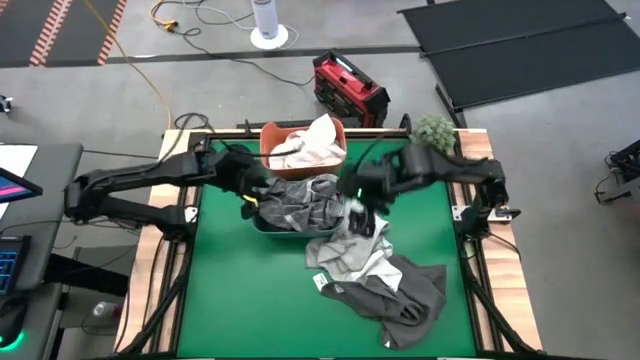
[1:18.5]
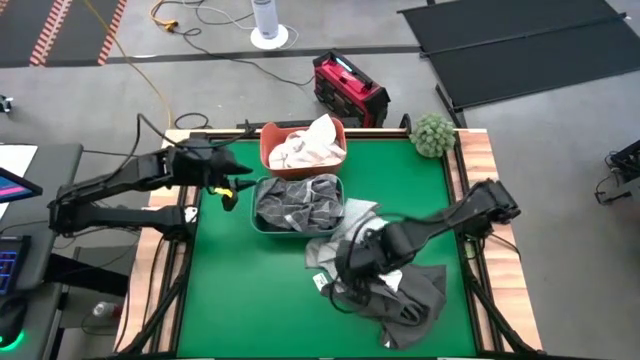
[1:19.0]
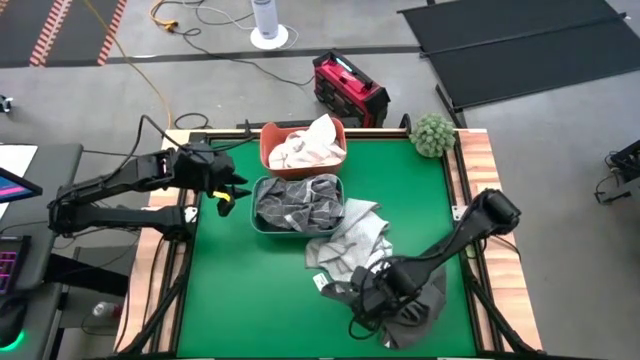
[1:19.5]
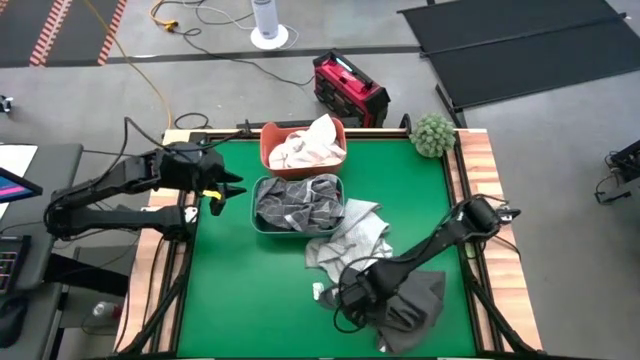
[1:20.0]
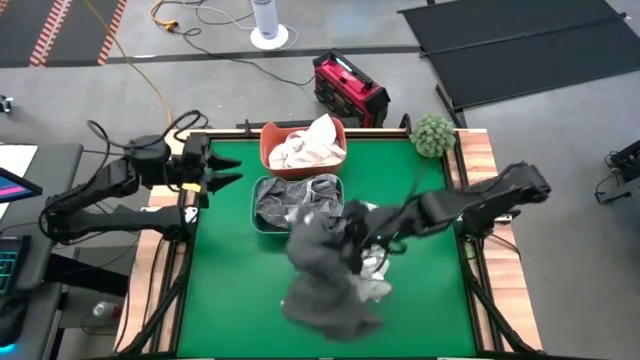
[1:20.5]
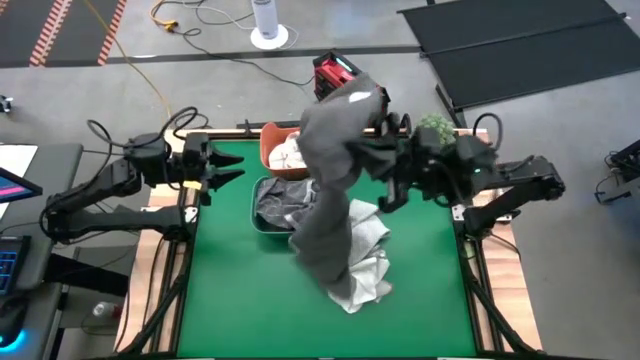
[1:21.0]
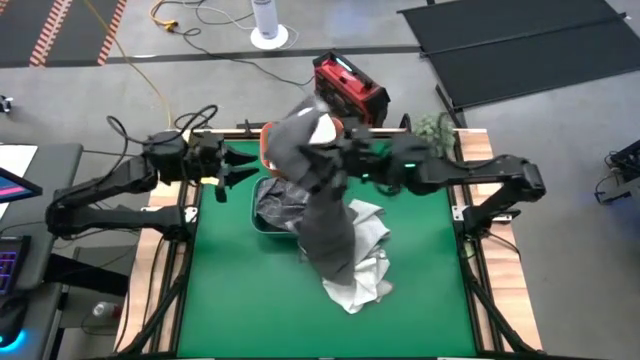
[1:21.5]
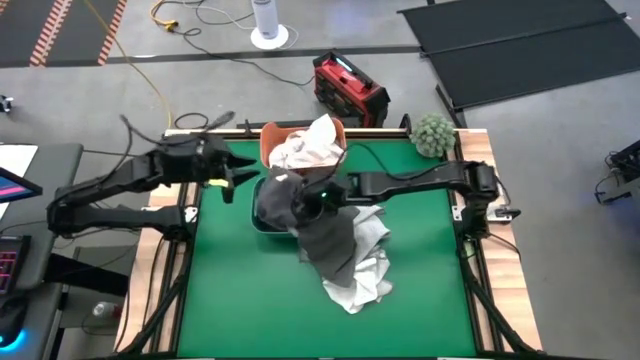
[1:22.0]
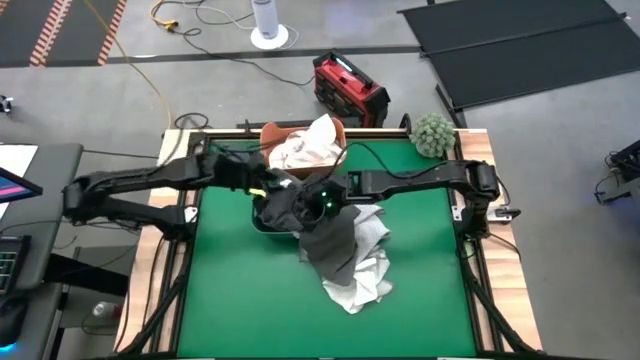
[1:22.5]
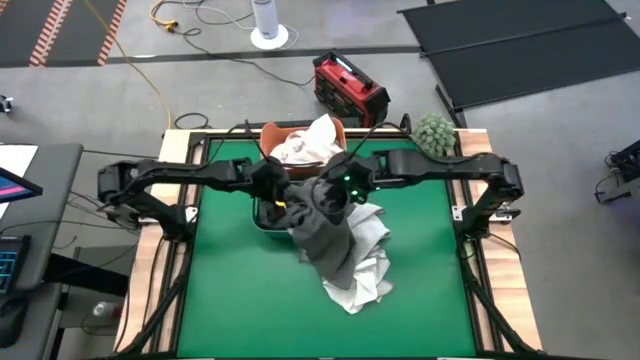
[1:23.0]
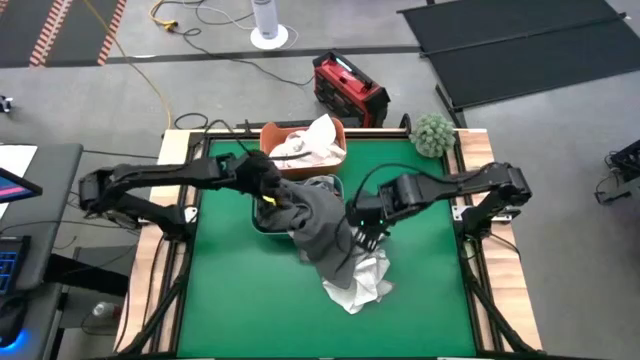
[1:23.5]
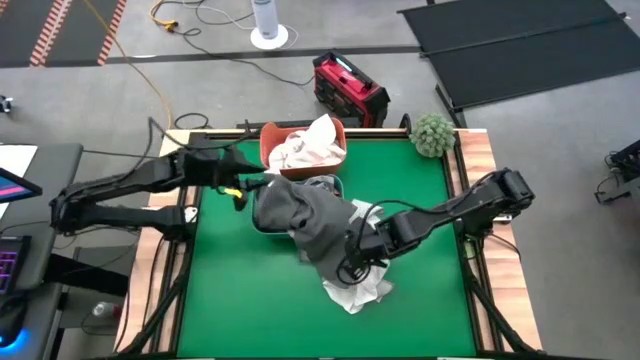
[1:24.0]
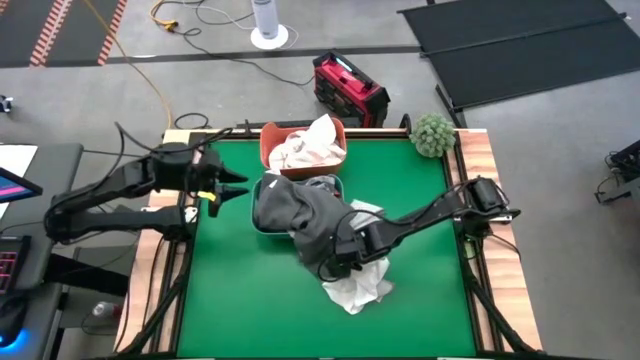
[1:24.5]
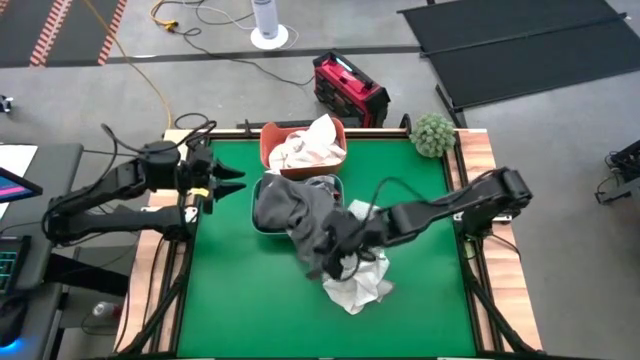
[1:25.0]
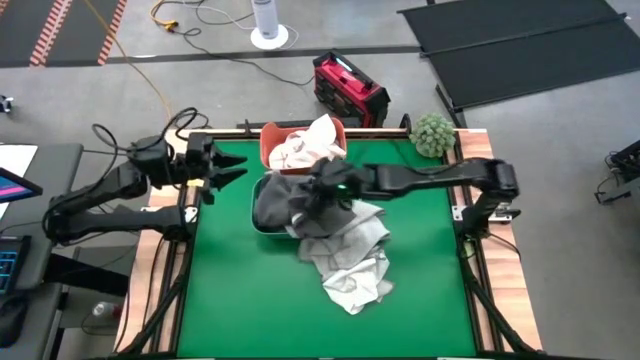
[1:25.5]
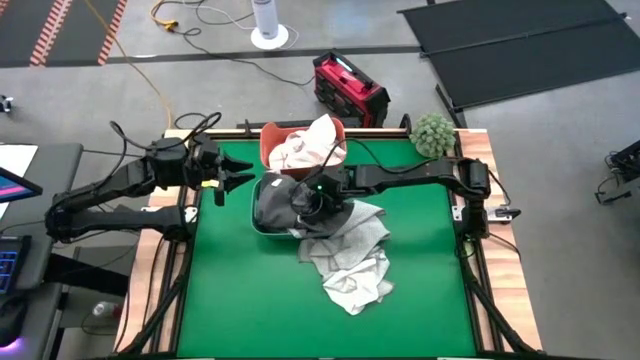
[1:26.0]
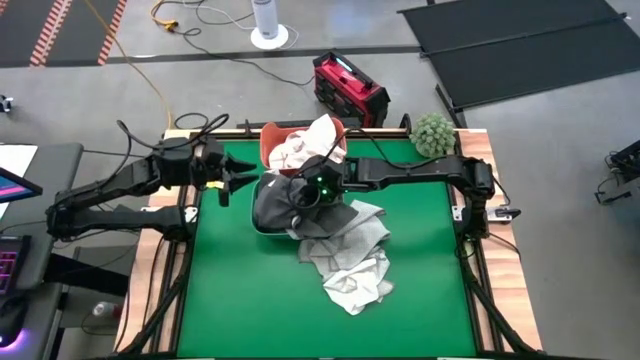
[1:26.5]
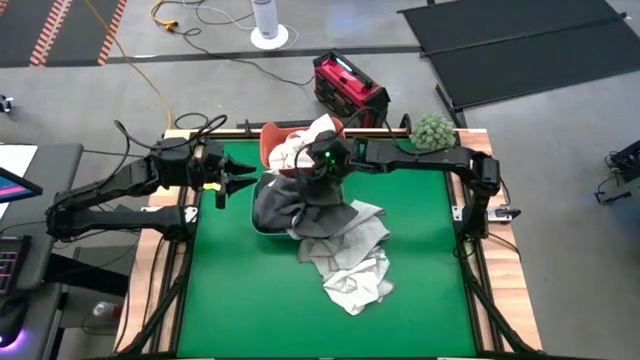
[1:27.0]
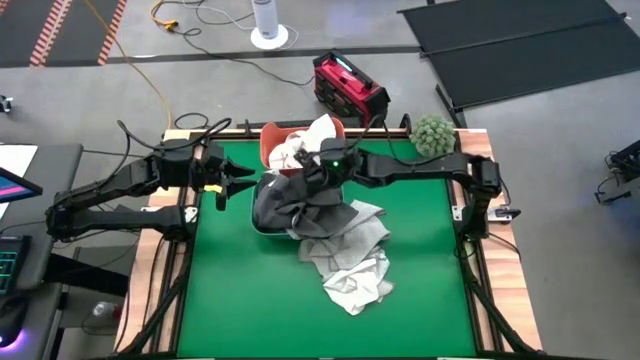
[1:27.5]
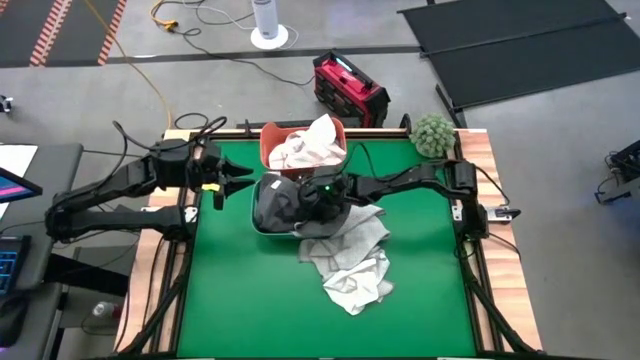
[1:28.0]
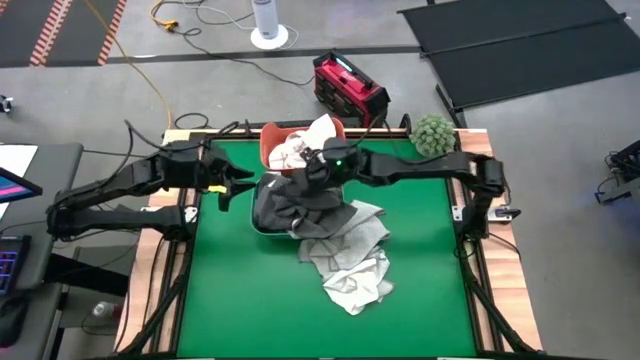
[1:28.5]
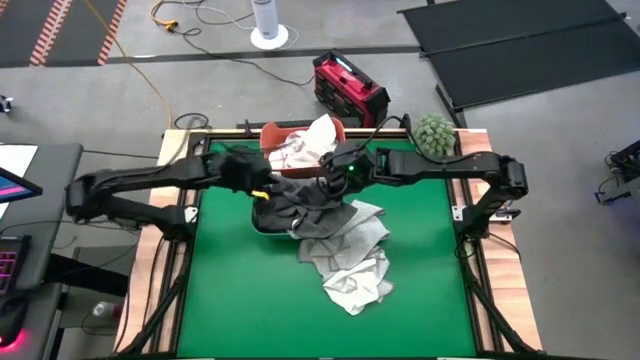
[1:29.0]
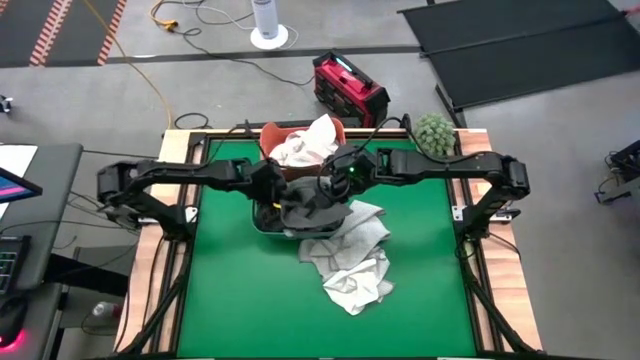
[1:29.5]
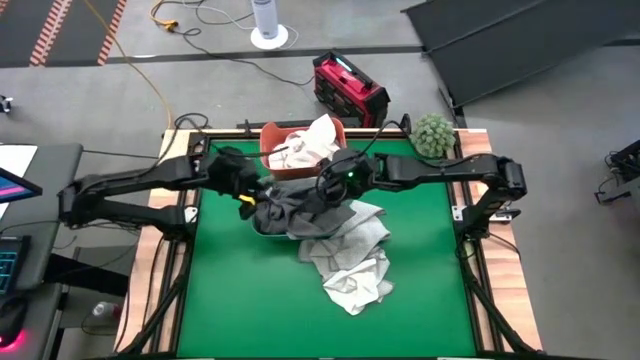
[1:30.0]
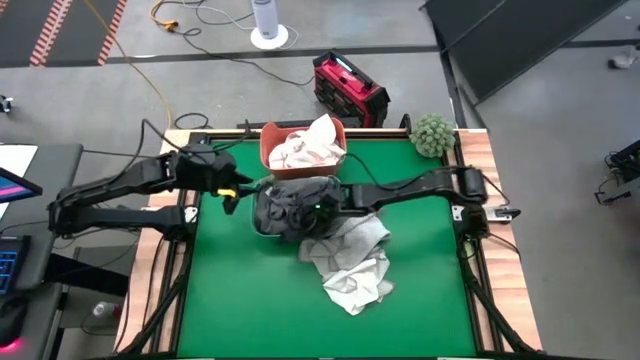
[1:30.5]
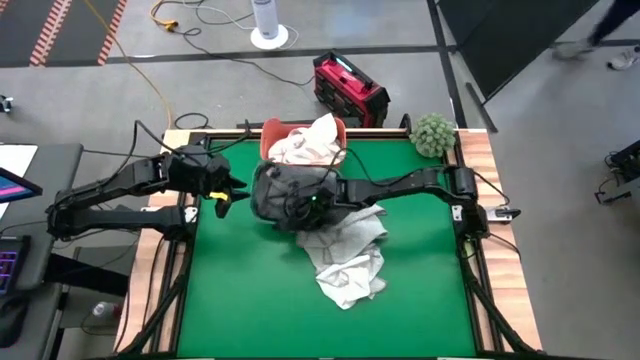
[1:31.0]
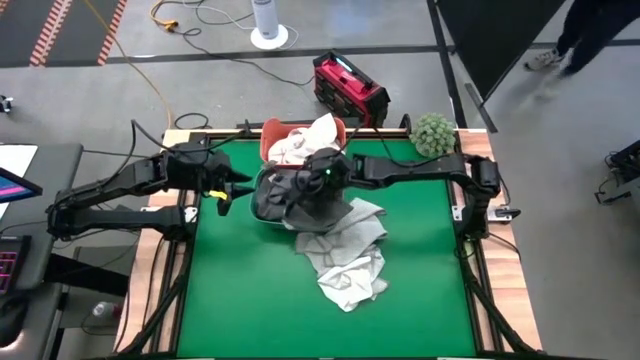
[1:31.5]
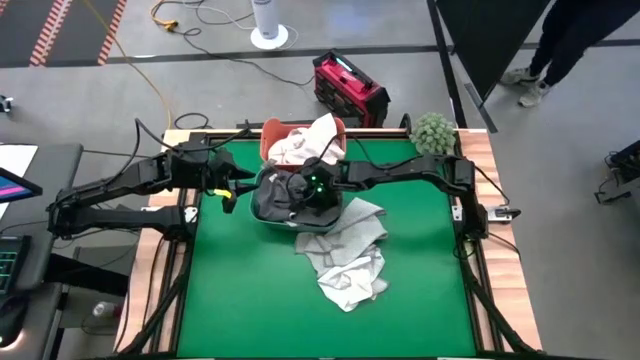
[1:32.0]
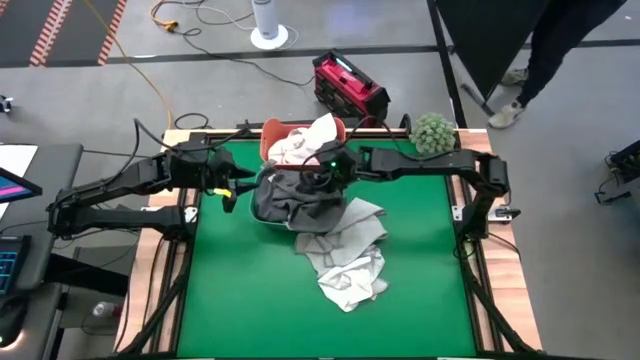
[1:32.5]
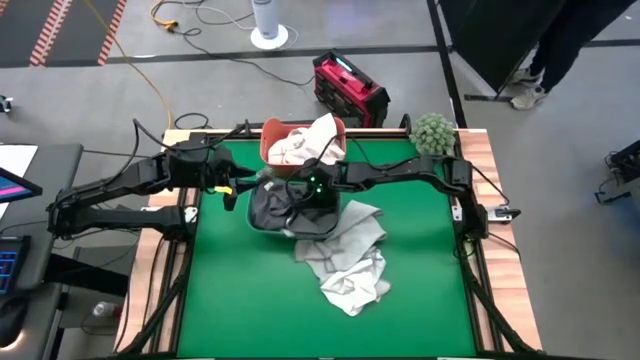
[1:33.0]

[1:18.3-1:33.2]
Task: Sort towels by color in basket
Put the gray towel into the green bin

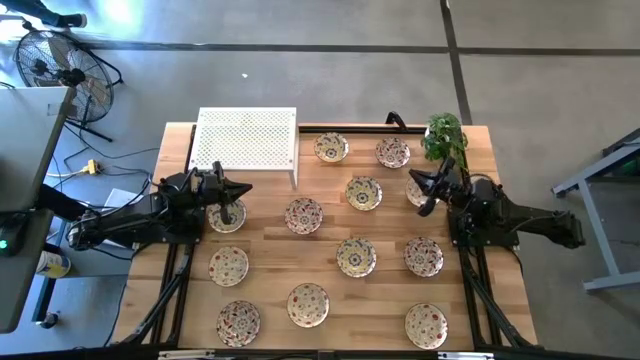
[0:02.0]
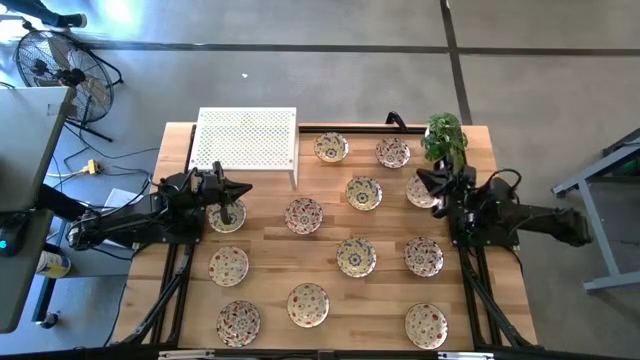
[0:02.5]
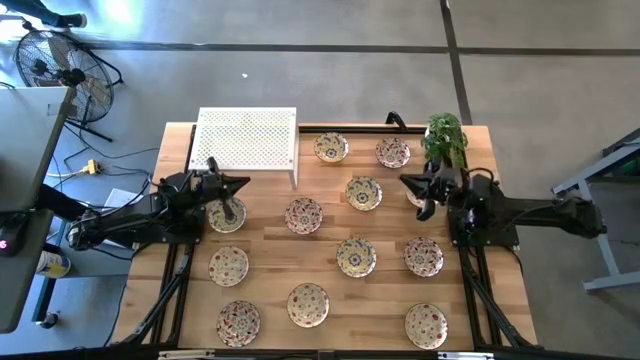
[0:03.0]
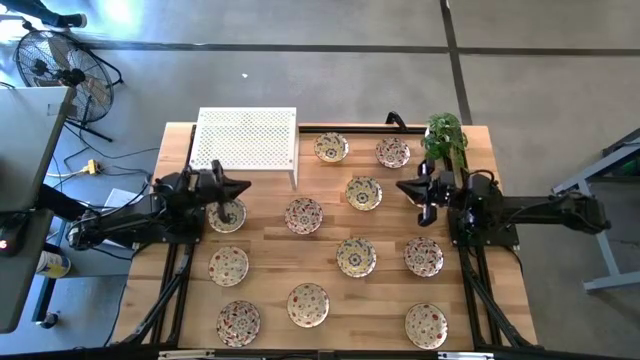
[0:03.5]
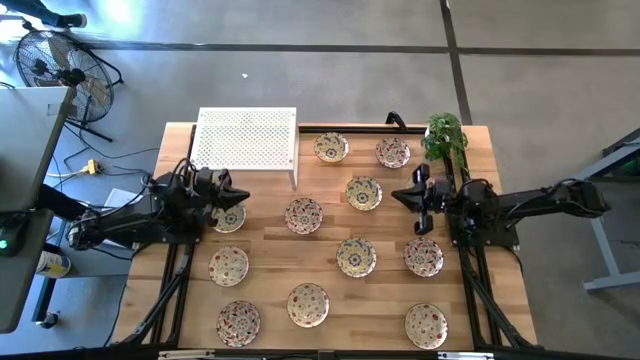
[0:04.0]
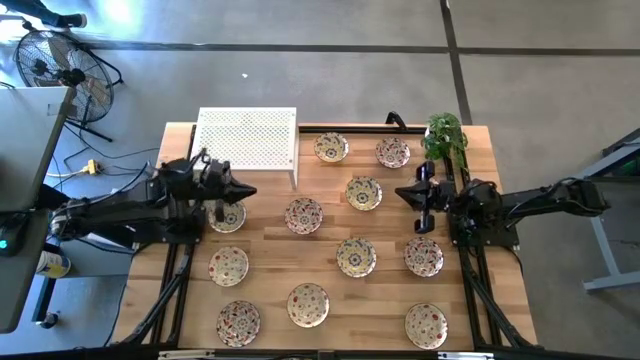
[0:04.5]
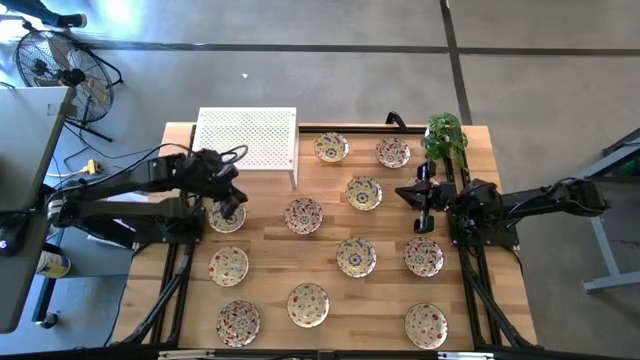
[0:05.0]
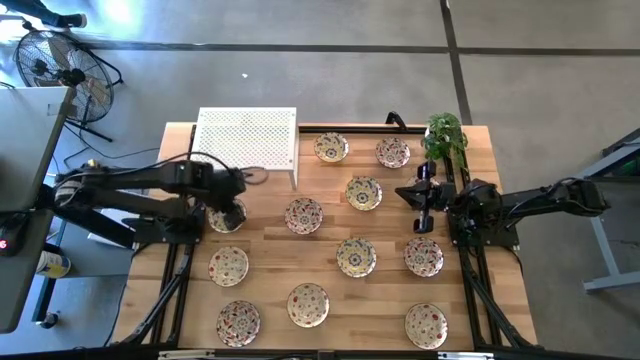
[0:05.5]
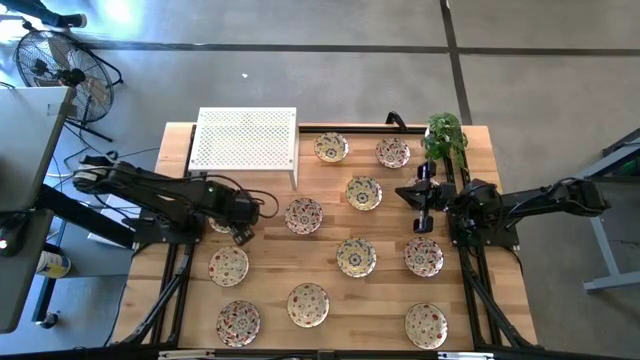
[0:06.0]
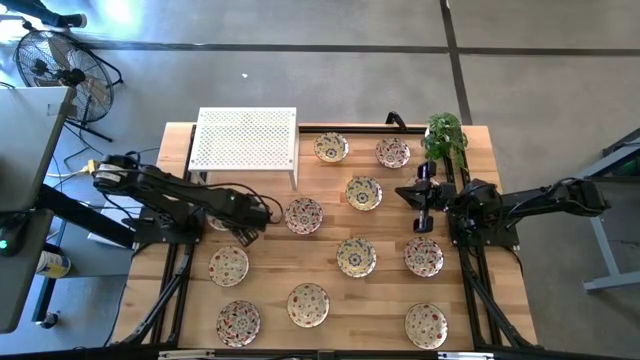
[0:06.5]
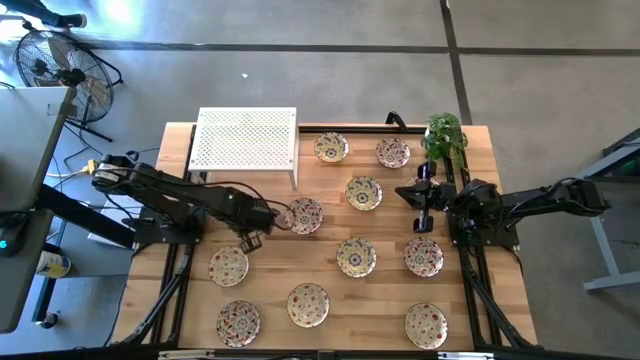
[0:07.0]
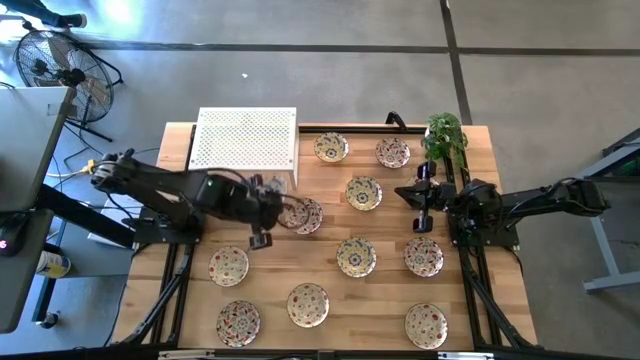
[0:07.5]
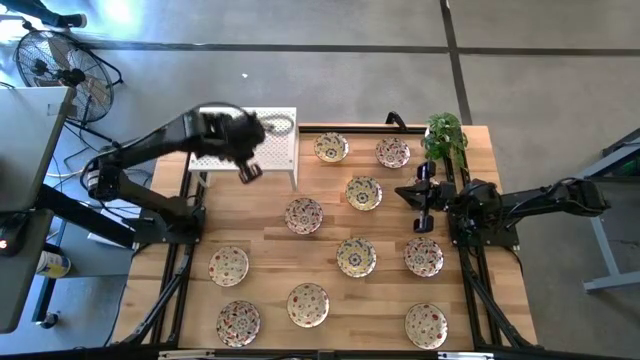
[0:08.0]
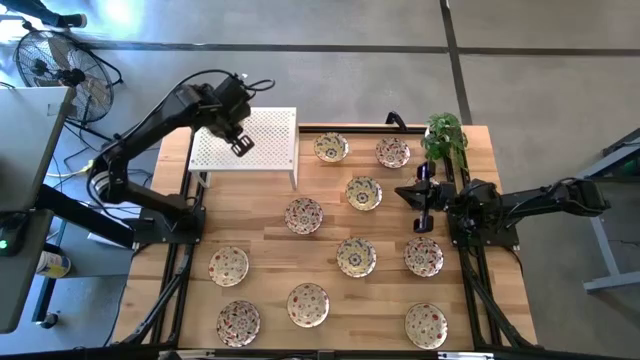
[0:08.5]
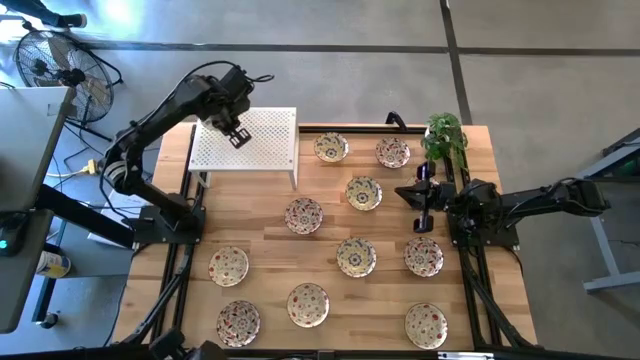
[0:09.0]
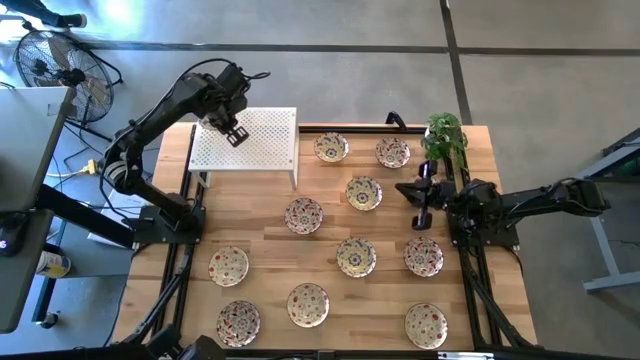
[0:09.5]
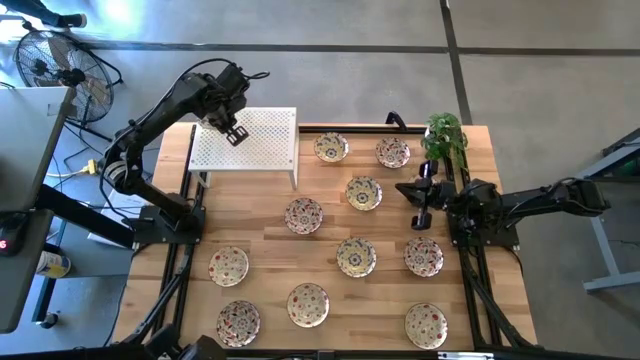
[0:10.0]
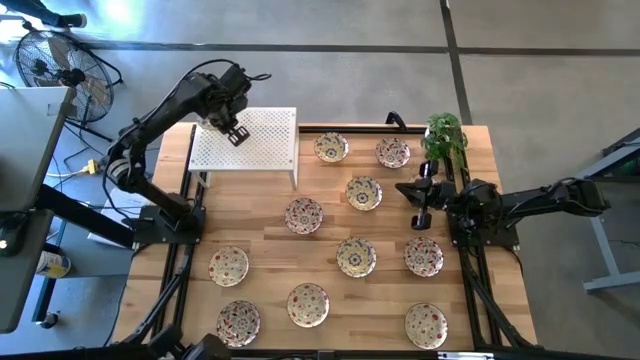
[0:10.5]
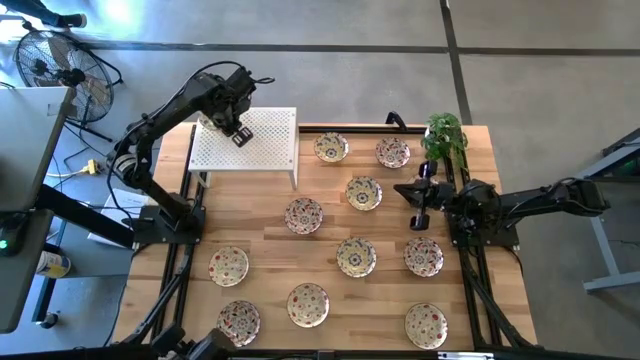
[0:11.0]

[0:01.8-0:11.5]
Task: Pick & Place Mini bowls
Put the yellow patterned bowl on the shelf
